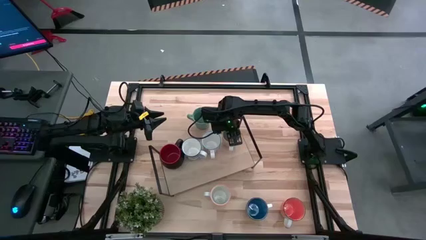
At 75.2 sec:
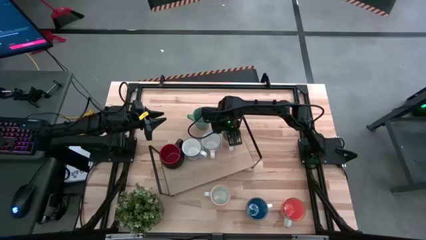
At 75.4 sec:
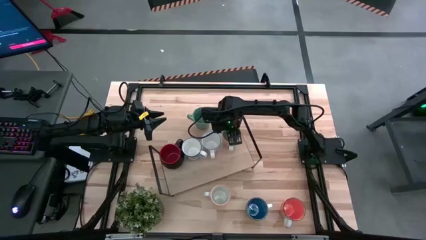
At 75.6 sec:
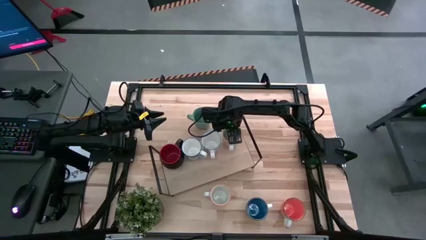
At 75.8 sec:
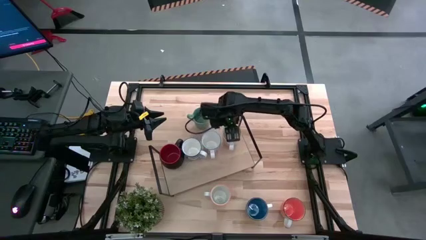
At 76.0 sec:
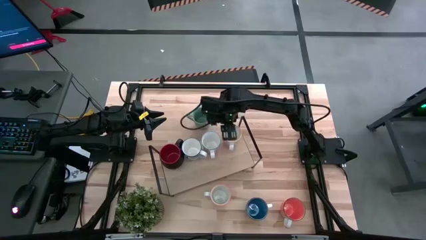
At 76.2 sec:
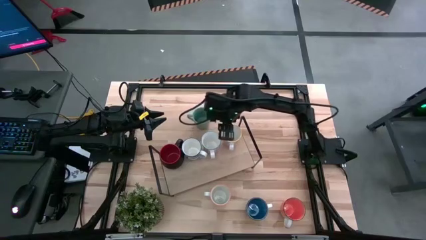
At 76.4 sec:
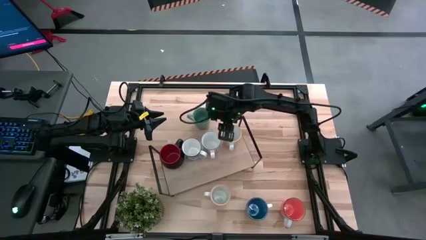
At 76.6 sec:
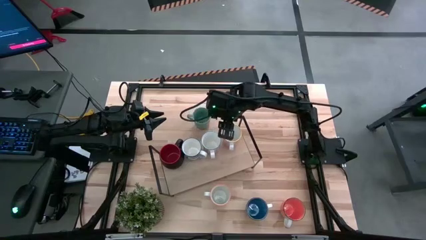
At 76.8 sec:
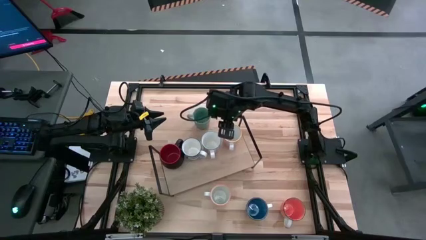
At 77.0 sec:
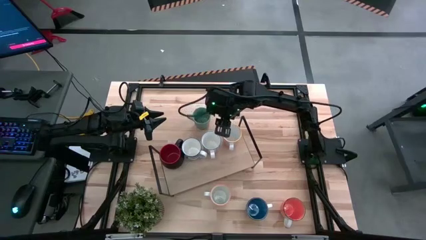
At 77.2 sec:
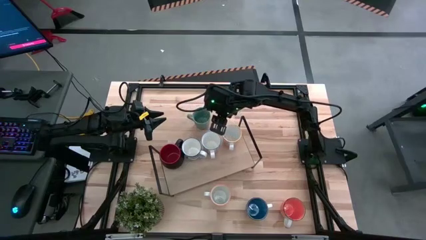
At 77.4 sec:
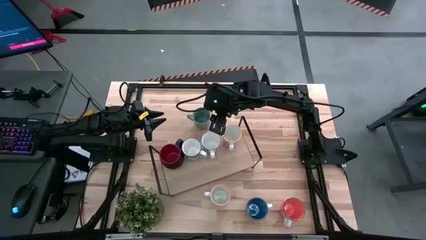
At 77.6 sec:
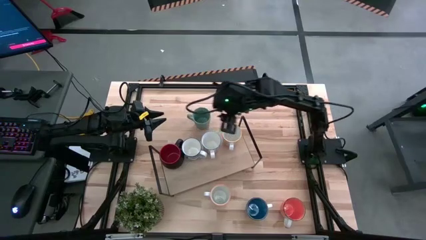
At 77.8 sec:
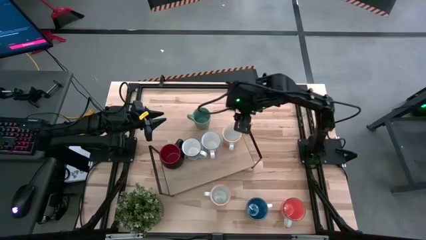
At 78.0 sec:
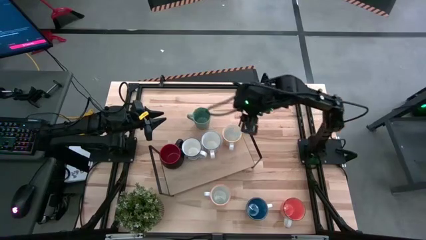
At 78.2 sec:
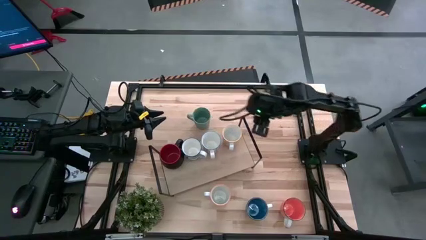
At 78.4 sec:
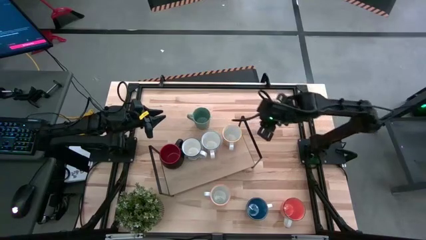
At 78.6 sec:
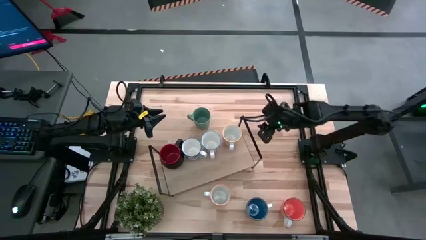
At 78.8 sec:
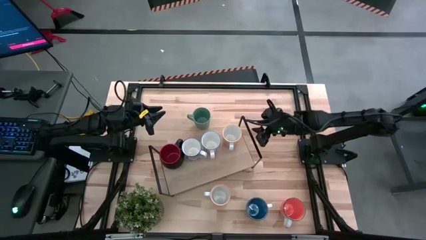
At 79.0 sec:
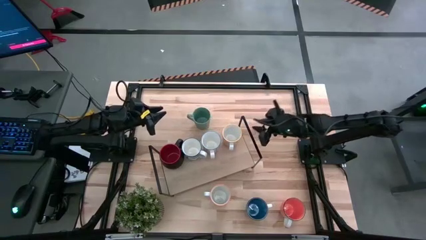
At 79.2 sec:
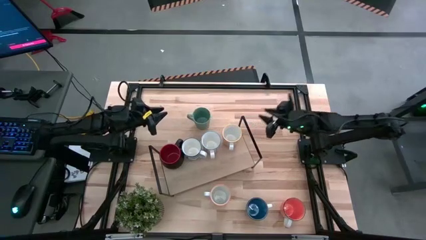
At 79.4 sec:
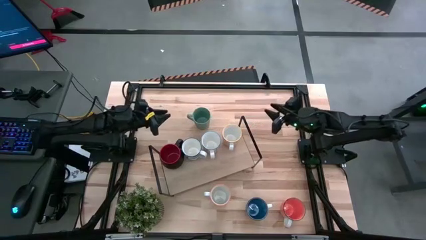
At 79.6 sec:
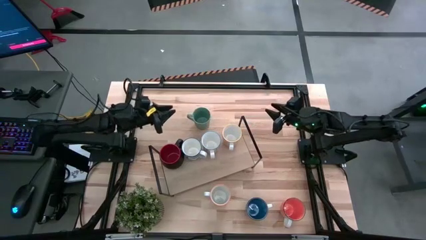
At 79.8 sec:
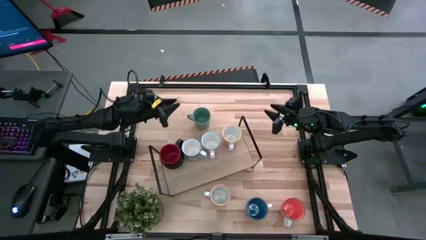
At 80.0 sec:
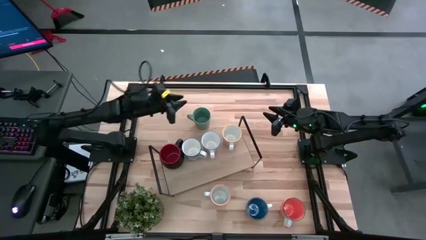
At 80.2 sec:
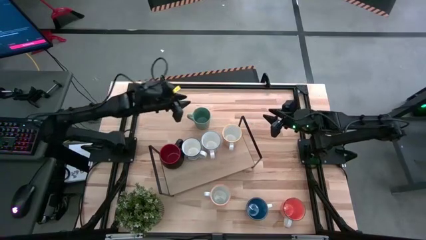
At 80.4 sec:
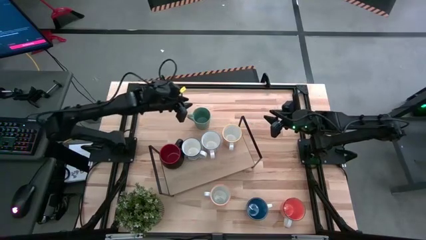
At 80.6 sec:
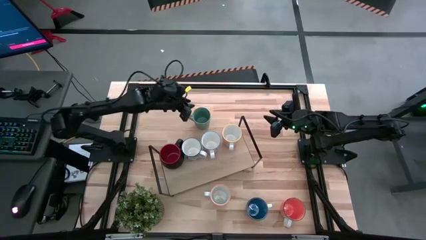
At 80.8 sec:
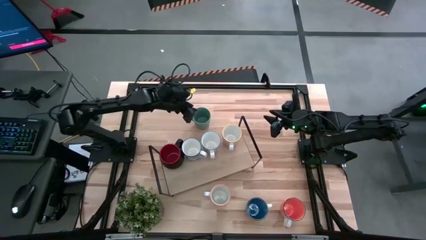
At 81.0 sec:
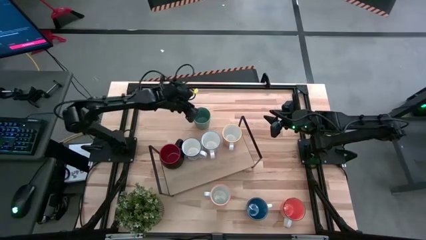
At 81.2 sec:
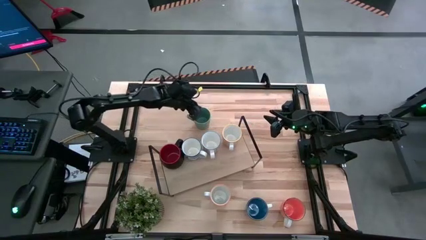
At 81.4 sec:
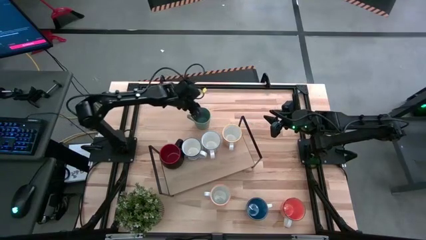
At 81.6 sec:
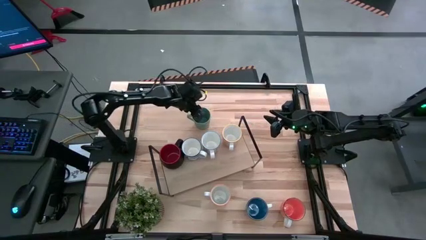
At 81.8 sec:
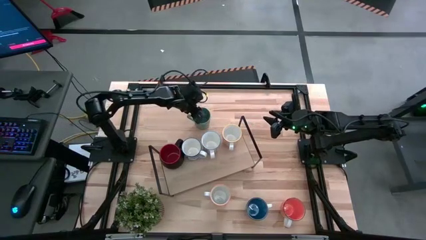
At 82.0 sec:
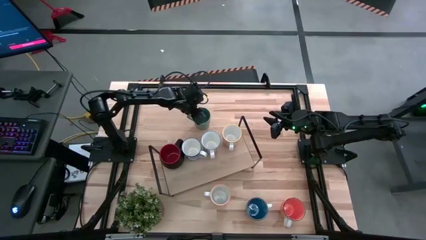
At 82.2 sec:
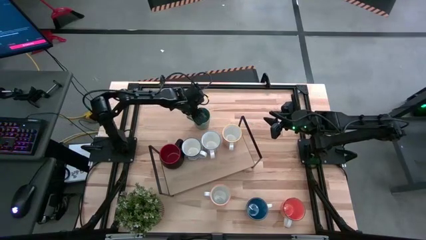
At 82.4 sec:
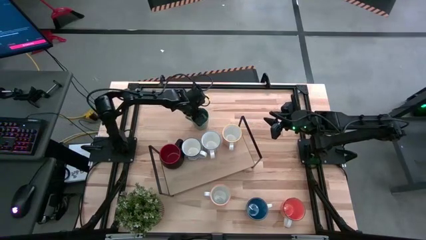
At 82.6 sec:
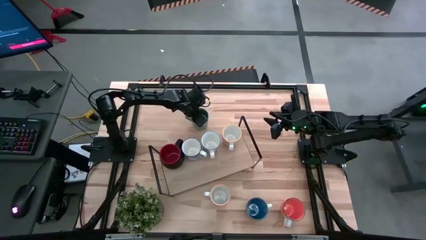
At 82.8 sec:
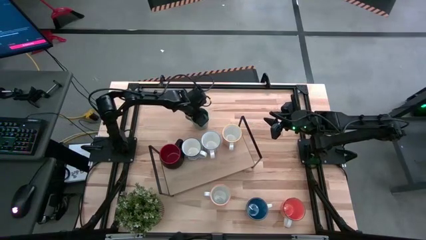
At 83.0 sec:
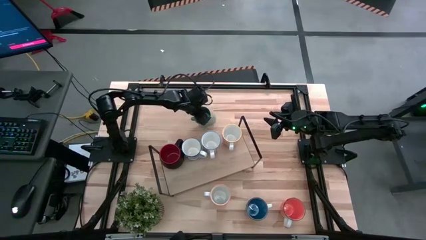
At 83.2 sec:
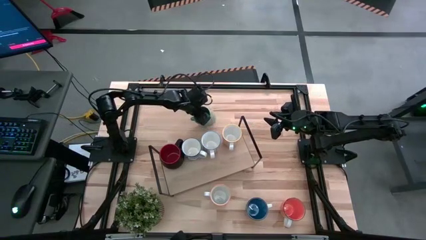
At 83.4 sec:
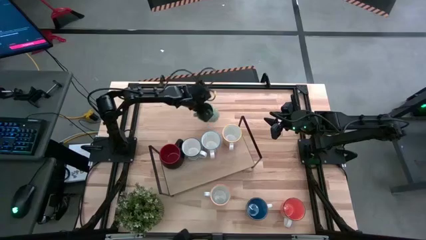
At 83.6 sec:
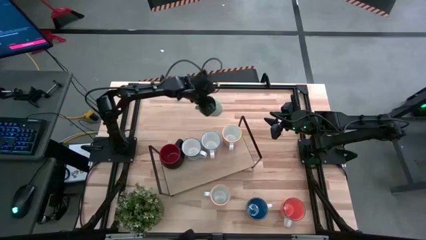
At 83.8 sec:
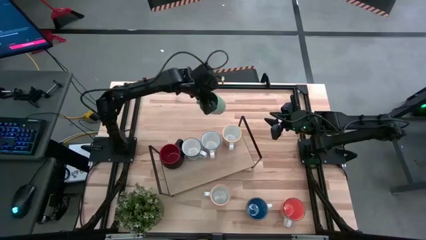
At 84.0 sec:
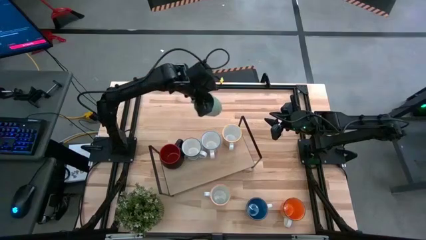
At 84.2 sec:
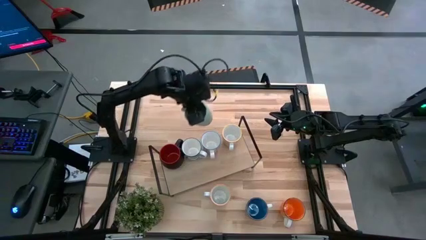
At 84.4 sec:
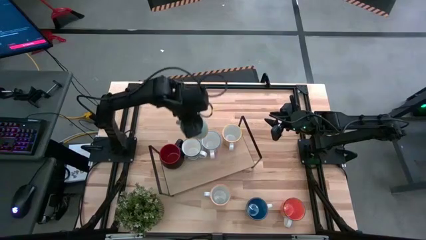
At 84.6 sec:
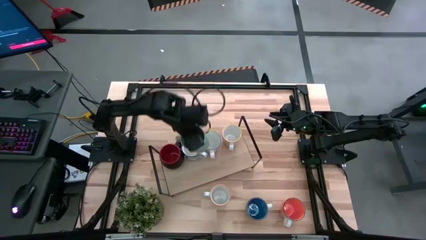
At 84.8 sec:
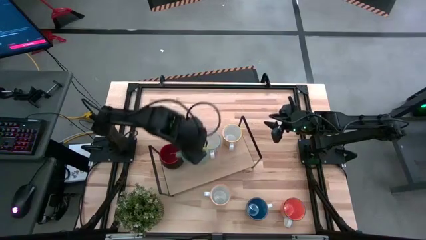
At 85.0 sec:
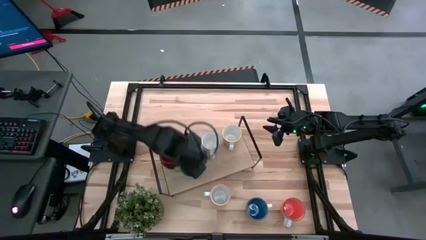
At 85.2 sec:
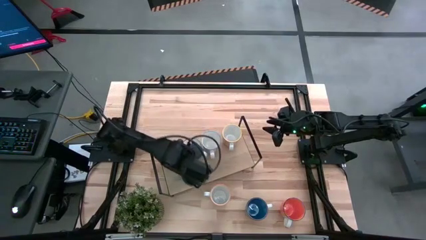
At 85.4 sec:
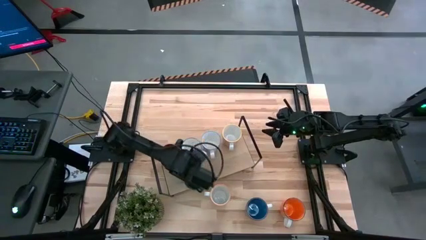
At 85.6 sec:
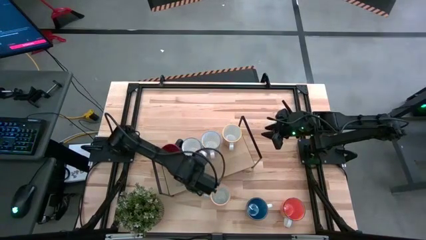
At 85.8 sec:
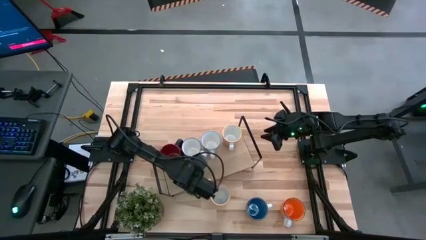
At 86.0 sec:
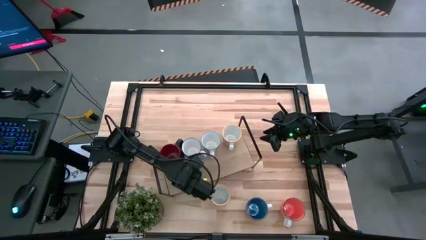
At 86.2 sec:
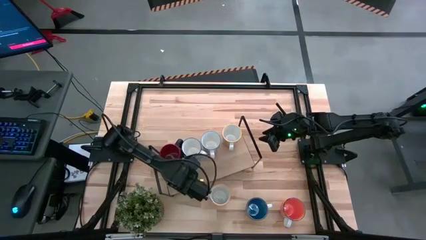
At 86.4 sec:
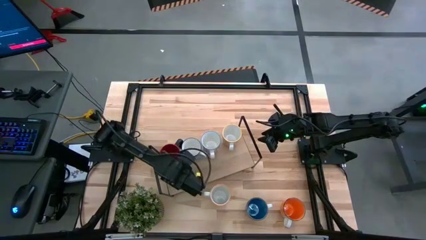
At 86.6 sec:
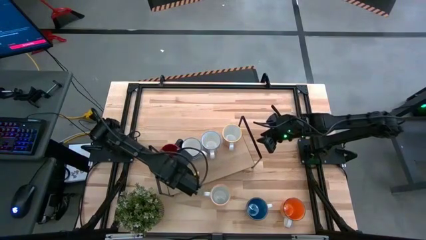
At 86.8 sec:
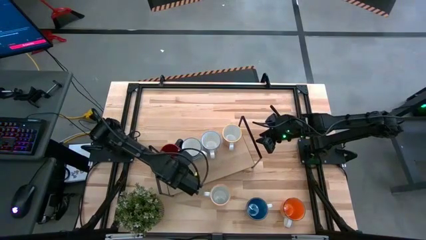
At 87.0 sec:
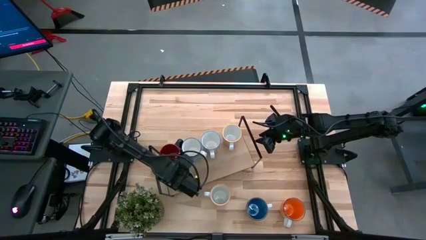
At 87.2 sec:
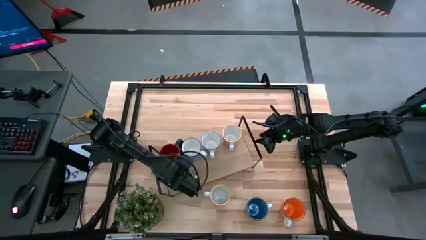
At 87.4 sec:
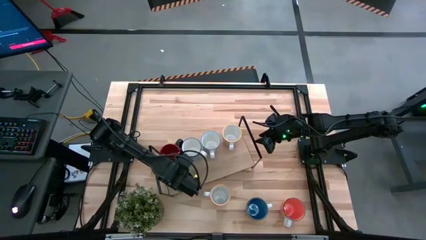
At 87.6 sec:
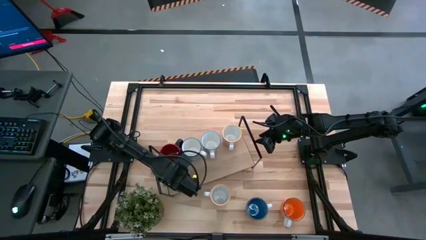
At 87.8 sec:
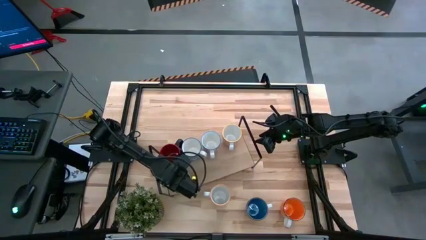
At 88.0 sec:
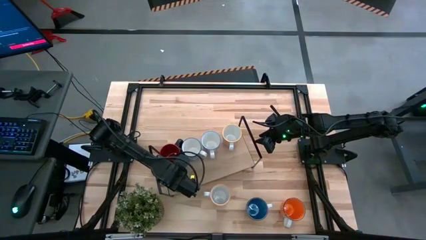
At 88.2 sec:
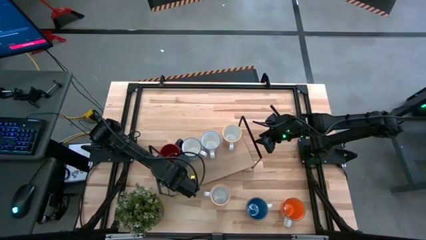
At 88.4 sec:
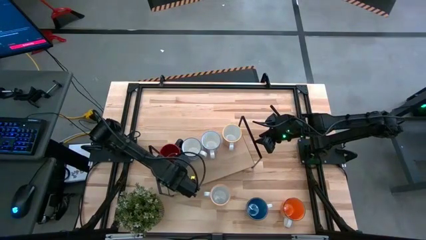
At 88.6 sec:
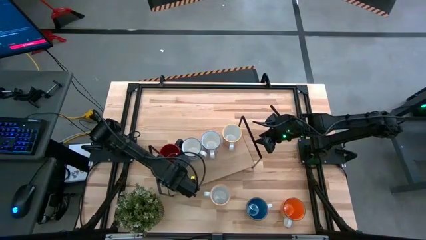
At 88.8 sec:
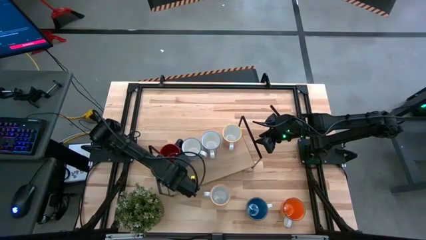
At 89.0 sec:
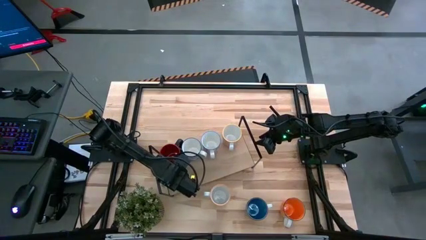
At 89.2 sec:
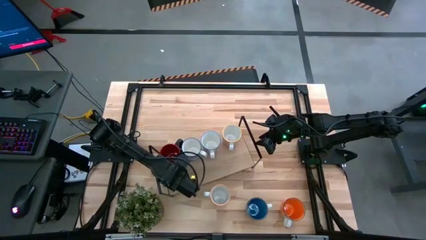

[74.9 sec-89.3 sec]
Task: Place coffee mugs
Put the green mug on the shelf
